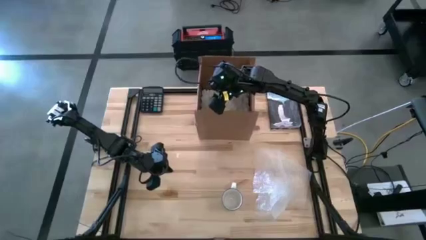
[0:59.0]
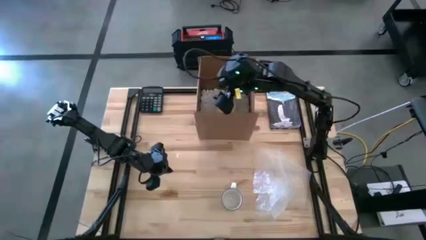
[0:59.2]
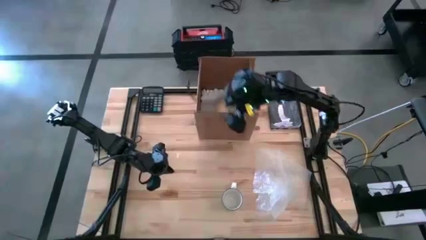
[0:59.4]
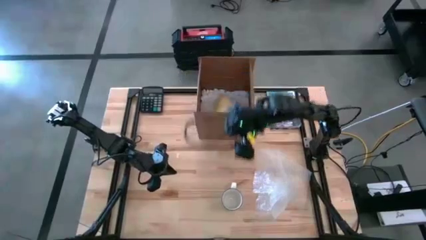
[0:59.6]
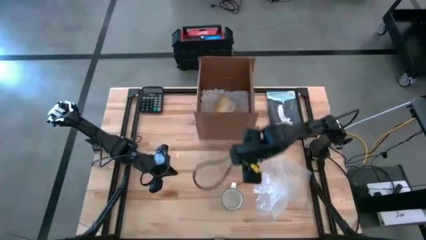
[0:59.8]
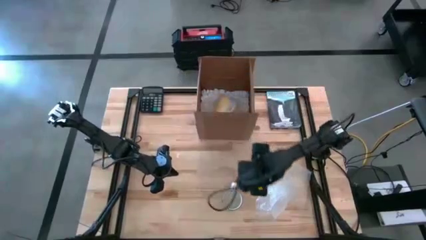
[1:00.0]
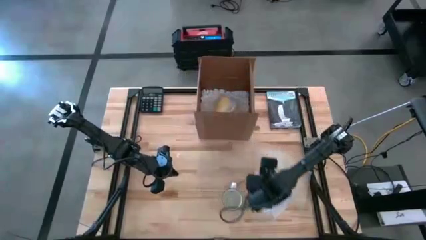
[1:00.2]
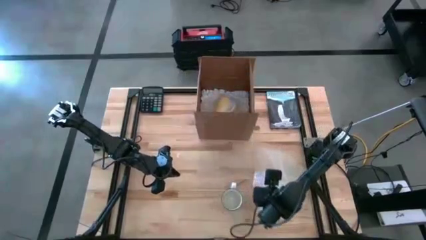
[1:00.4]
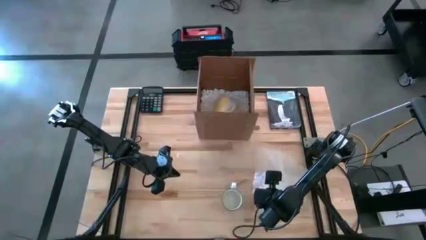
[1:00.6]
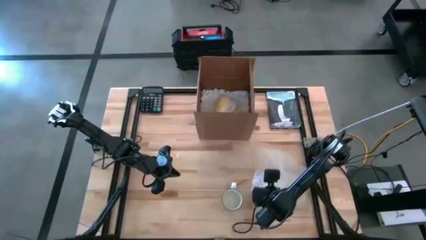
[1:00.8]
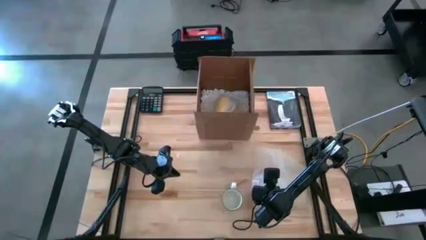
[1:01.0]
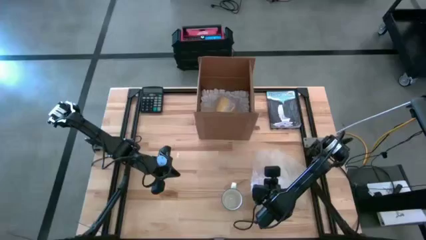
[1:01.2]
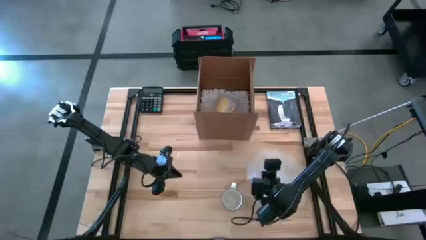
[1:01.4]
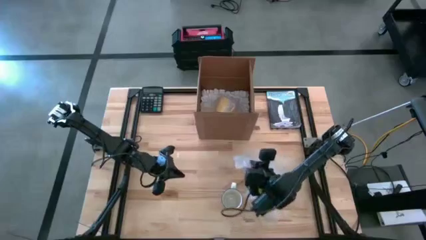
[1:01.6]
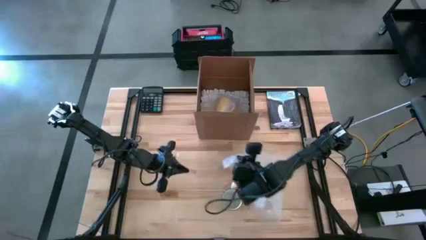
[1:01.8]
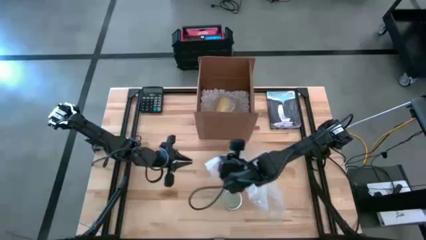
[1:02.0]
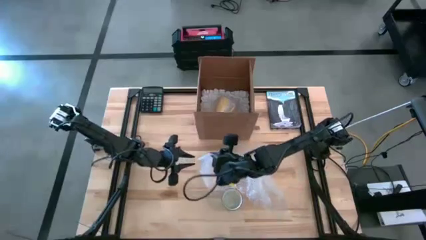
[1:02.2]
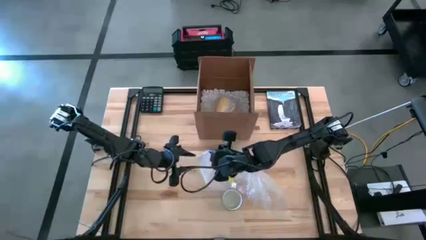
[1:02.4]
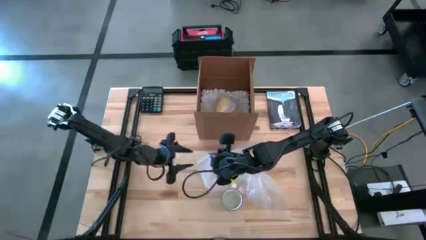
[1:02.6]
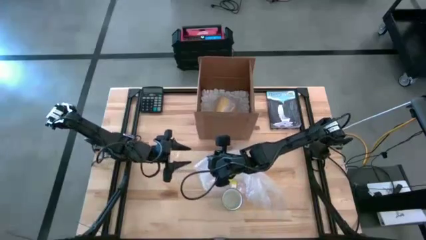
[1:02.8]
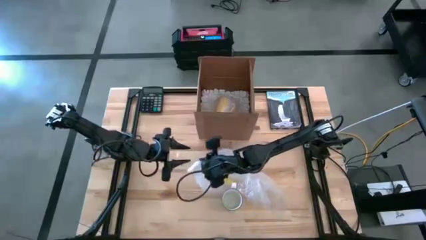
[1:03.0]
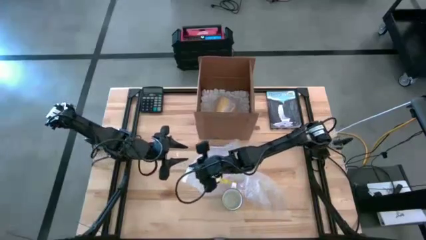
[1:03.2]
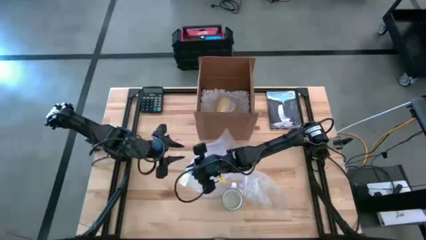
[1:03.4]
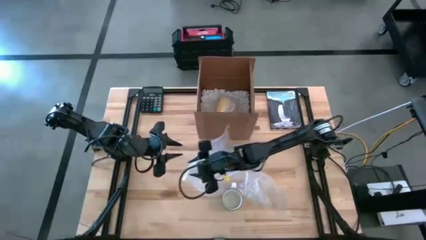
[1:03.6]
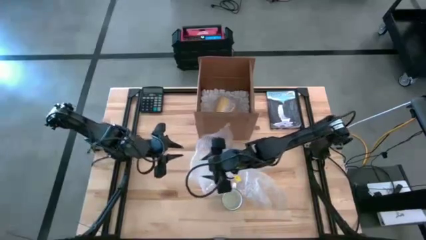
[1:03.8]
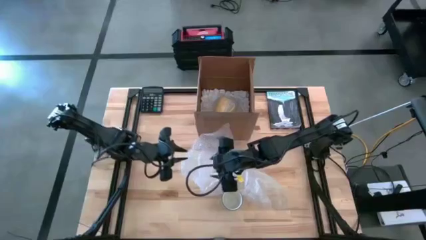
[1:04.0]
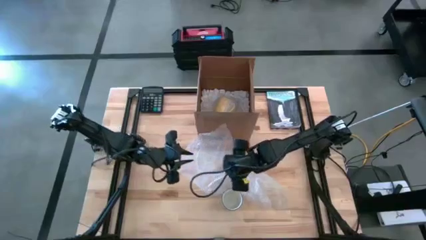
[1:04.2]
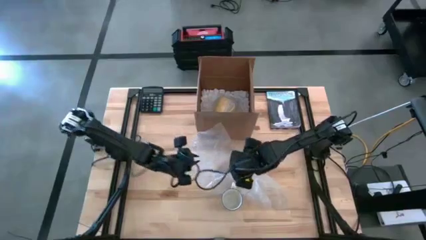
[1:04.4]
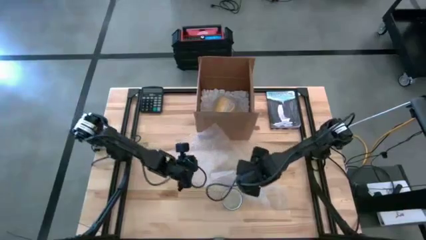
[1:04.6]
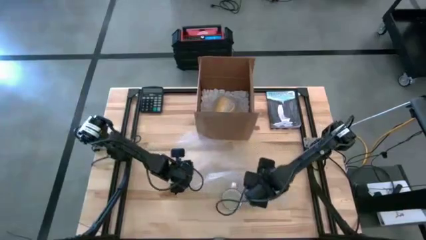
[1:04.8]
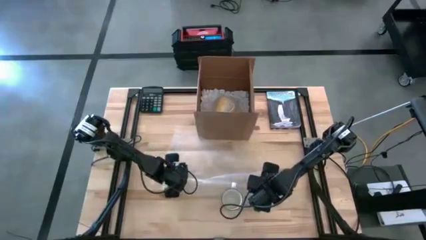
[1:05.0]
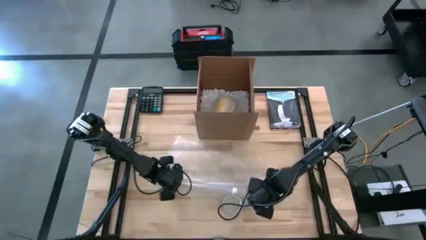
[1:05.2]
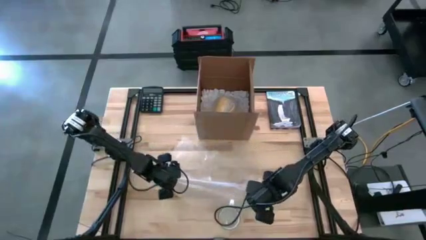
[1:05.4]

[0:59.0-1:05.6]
Task: wrap mug
Prepare the bubble wrap

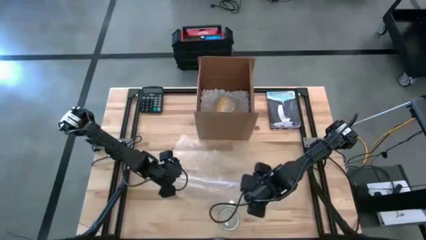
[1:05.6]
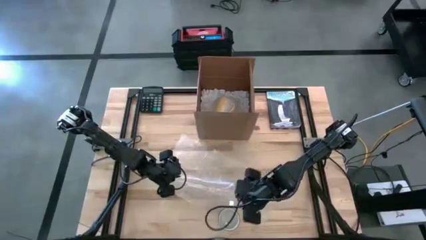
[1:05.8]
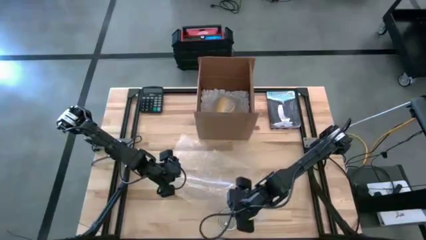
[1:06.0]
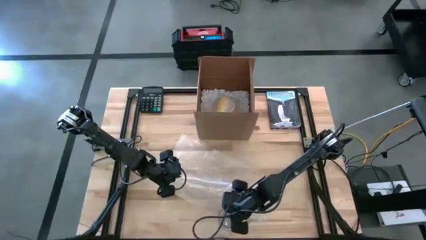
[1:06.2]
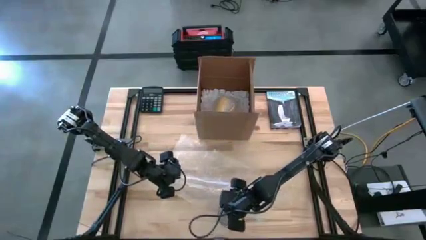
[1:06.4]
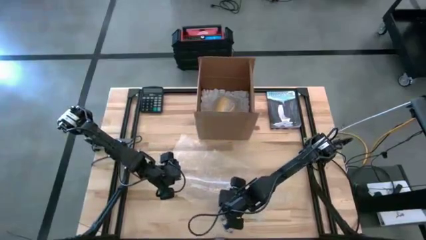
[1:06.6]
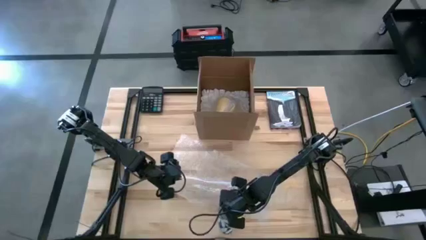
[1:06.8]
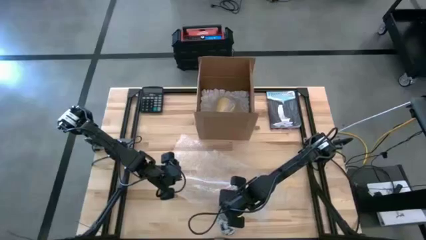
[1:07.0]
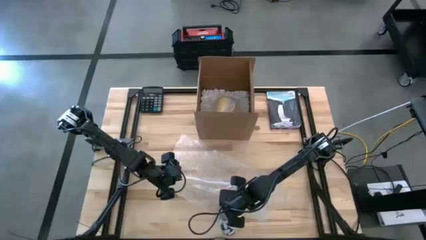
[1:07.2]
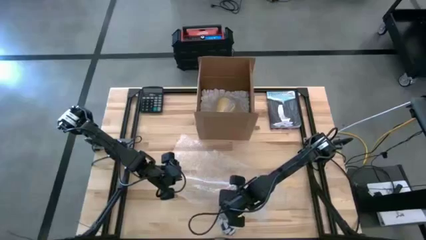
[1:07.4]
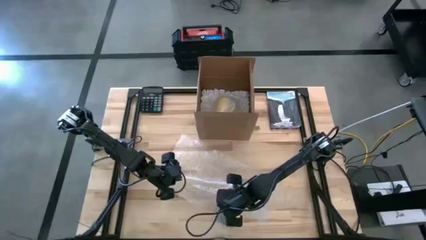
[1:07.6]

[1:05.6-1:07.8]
Wrap the blue mug in bubble wrap

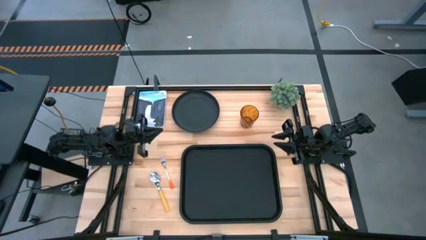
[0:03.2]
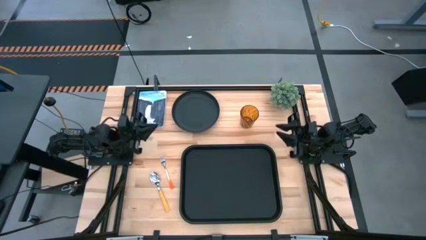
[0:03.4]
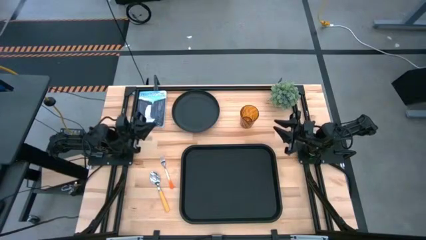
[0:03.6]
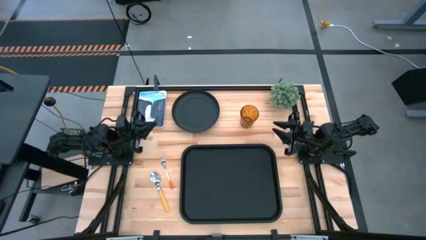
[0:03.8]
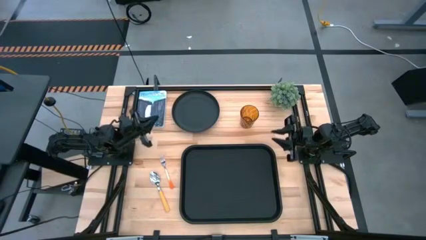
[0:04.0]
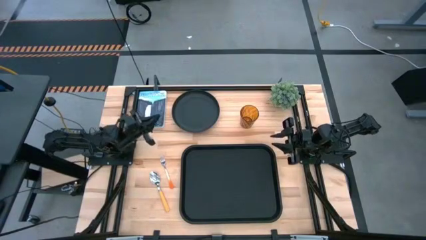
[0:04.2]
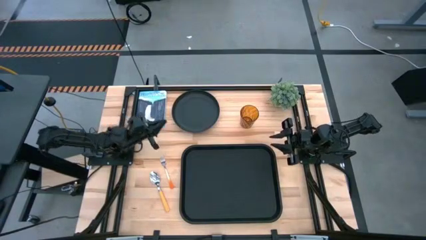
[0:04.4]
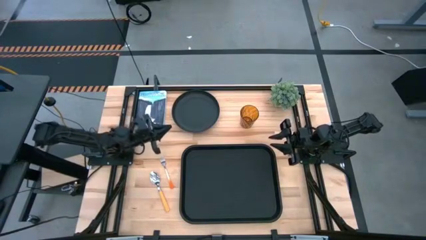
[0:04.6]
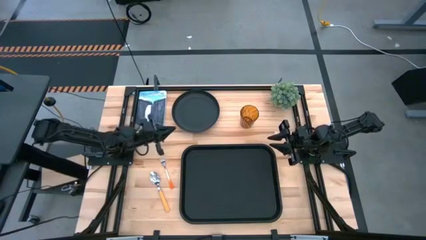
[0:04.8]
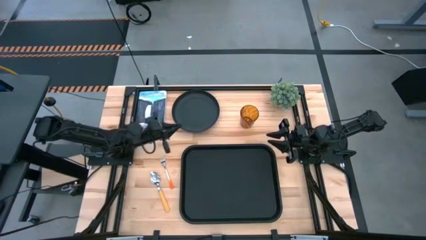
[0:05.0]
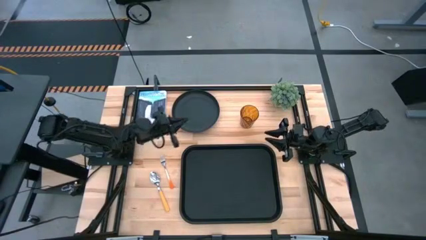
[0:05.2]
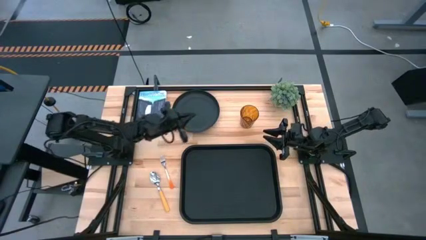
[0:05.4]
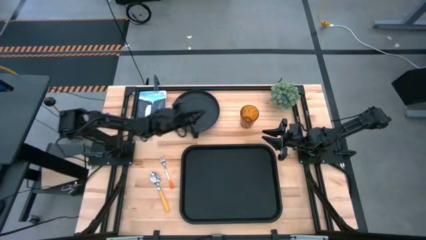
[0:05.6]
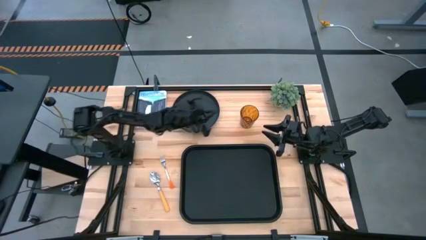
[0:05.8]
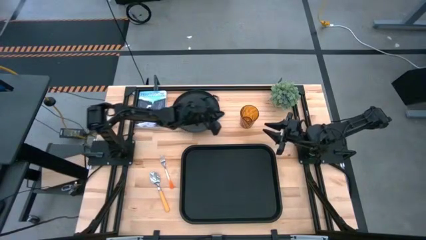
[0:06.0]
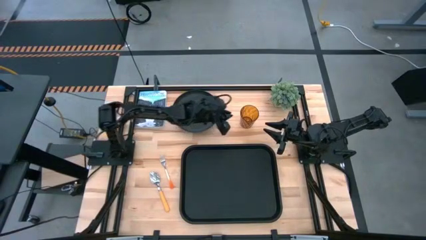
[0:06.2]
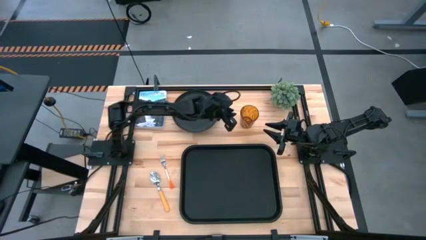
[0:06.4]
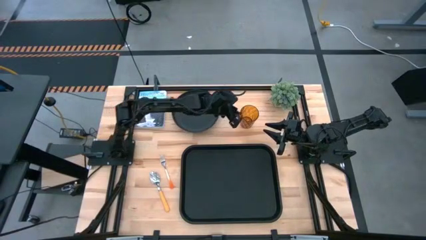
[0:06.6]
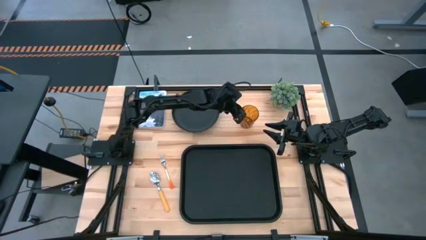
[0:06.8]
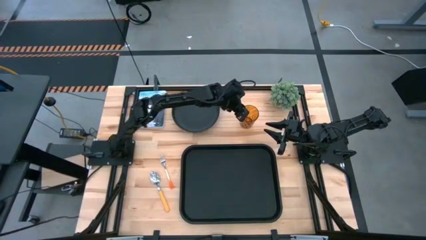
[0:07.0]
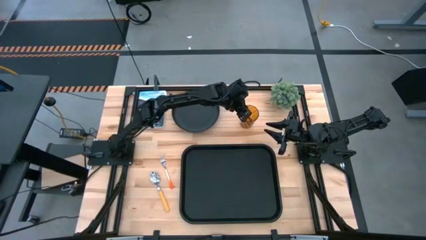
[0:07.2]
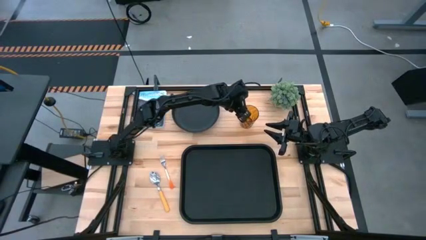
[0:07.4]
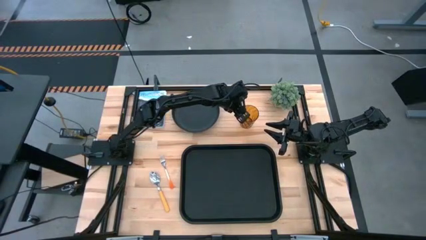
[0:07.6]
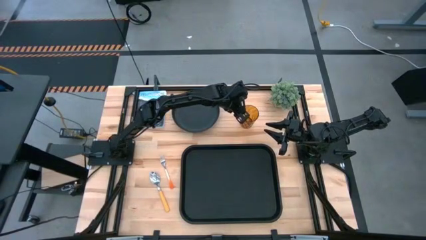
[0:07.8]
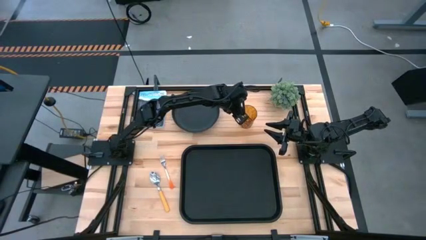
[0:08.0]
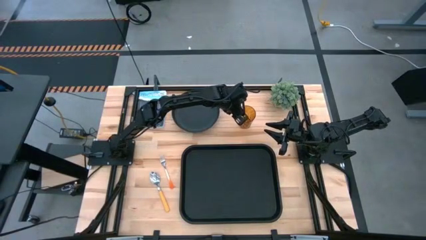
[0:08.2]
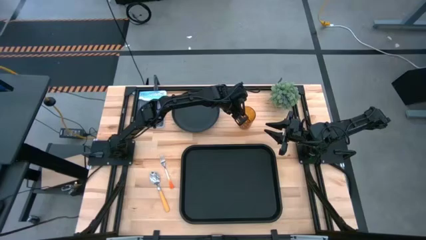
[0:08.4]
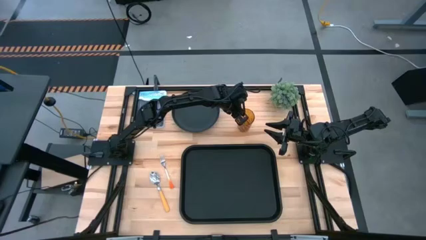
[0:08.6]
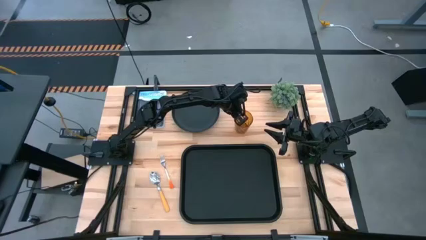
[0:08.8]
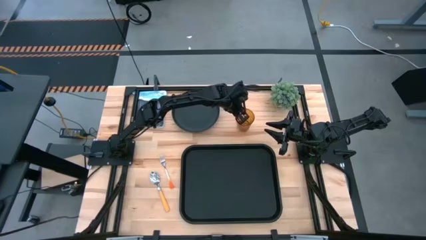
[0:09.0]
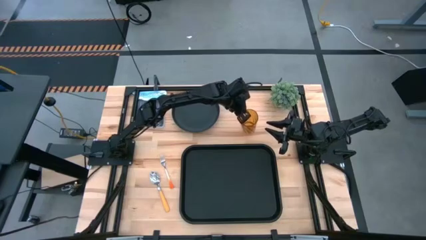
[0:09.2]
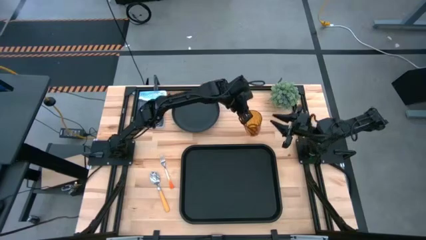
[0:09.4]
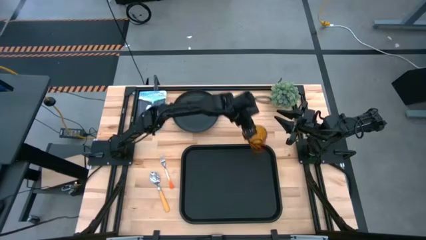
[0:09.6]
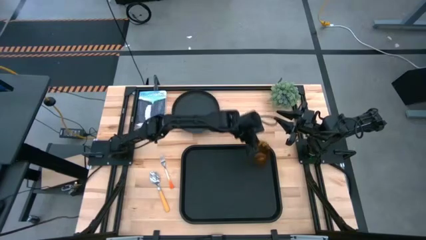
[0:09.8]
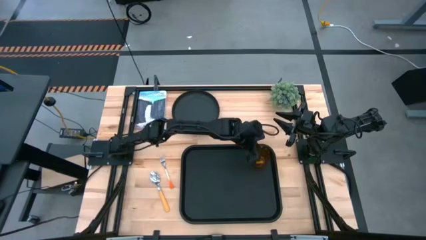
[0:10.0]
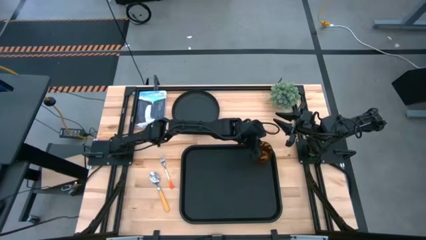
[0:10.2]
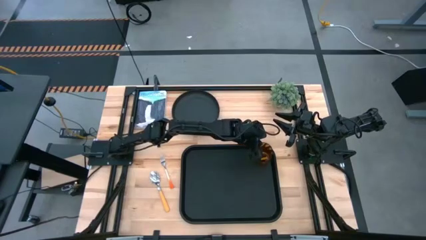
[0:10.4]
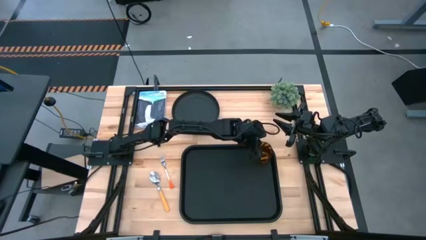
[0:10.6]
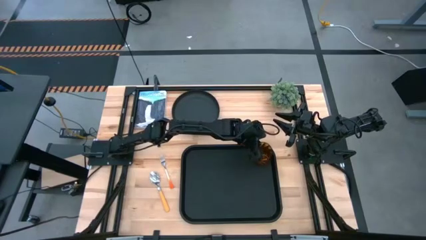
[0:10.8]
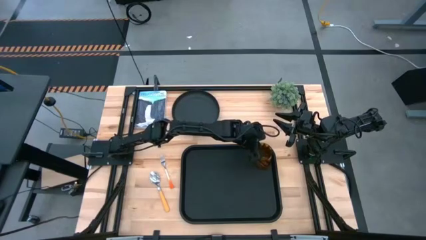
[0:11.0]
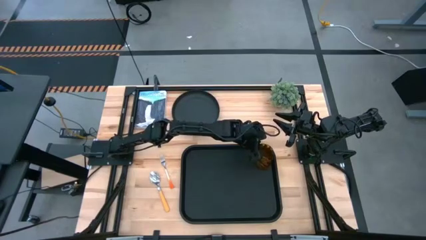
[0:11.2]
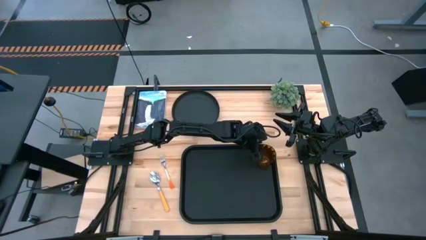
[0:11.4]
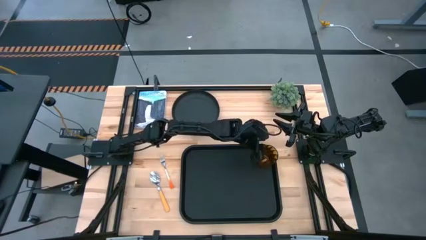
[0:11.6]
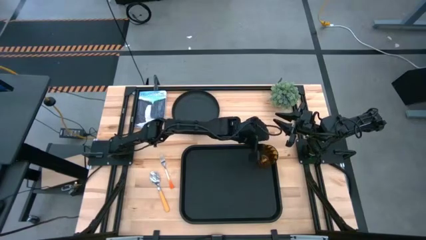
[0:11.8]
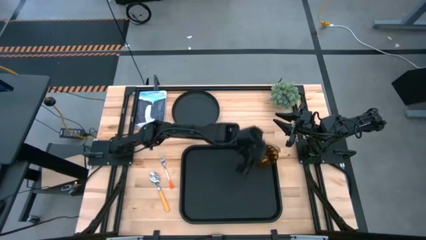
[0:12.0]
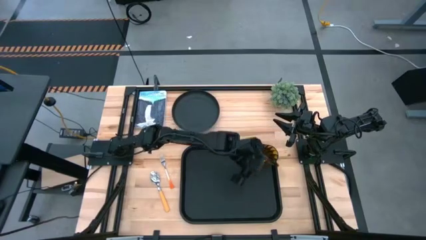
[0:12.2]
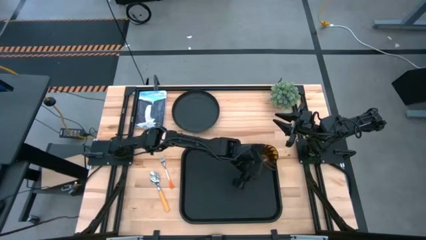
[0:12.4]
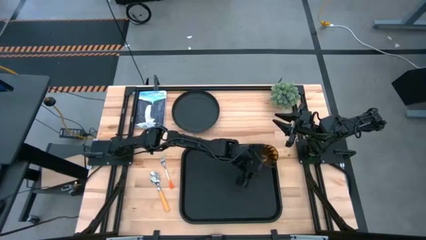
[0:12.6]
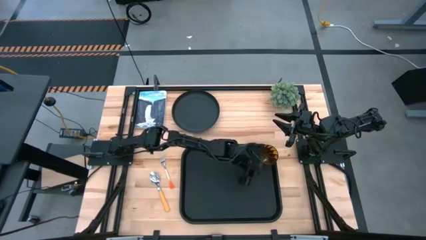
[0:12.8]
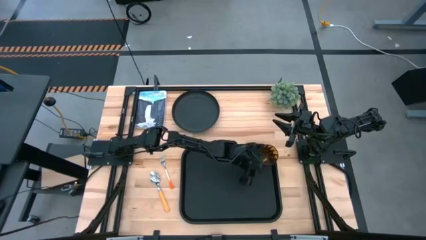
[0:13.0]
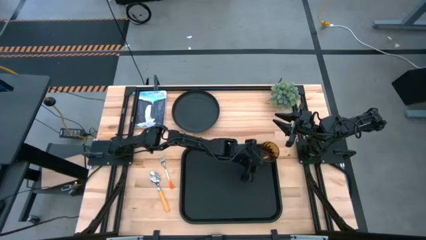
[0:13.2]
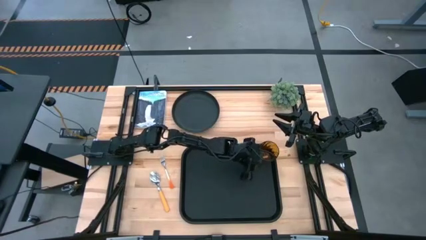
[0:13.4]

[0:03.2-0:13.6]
Task: Pick and place plate/cup/fork/spoon on tray
Put the brown cup on the top right of the black serving tray
